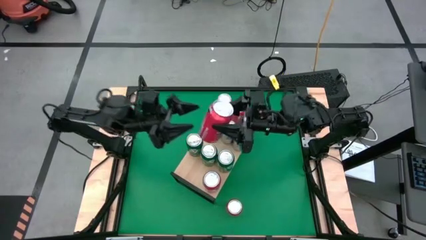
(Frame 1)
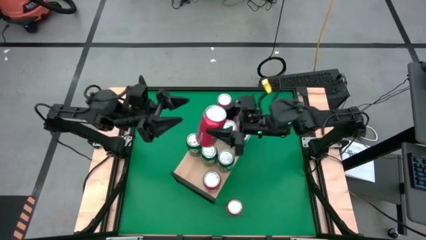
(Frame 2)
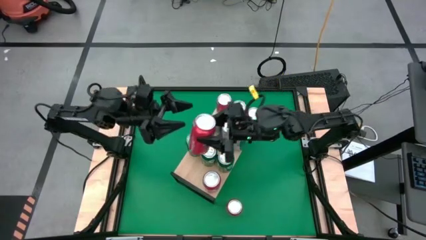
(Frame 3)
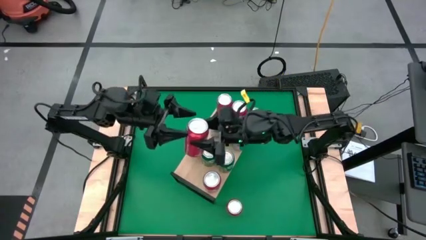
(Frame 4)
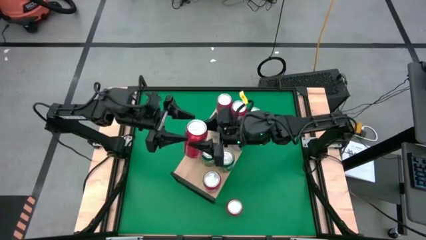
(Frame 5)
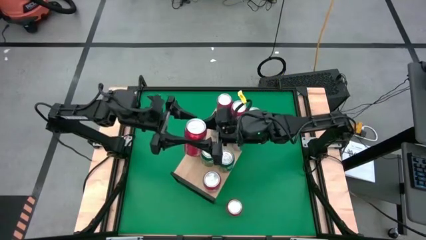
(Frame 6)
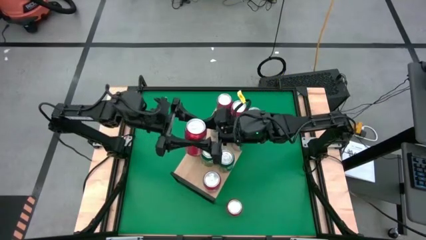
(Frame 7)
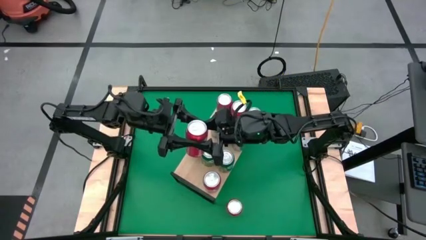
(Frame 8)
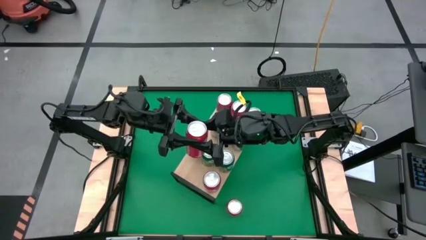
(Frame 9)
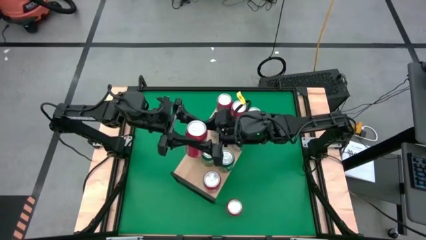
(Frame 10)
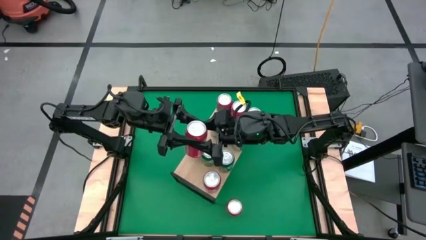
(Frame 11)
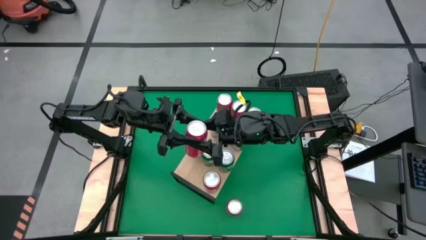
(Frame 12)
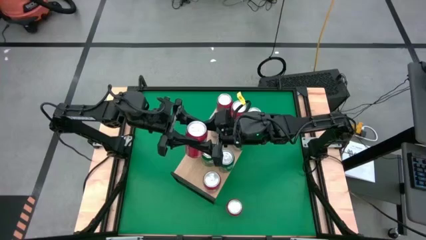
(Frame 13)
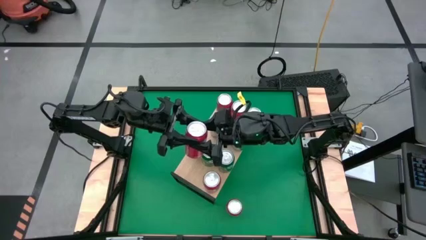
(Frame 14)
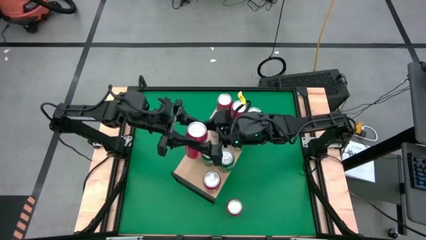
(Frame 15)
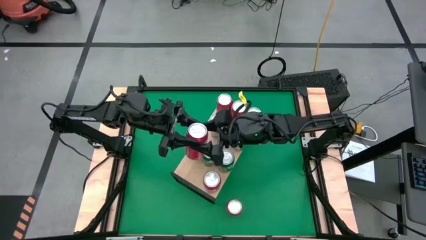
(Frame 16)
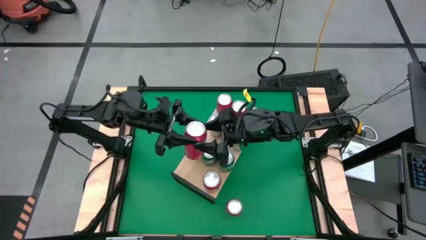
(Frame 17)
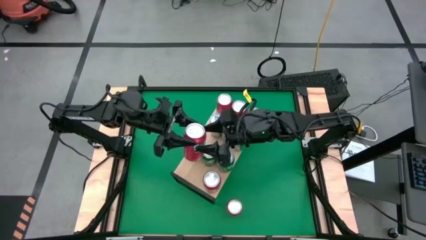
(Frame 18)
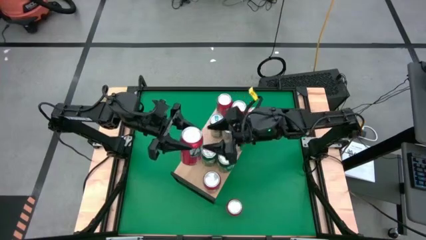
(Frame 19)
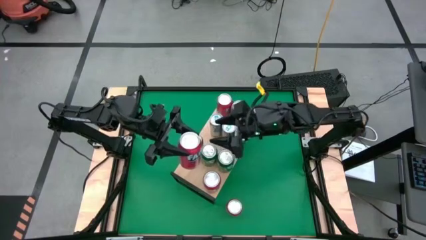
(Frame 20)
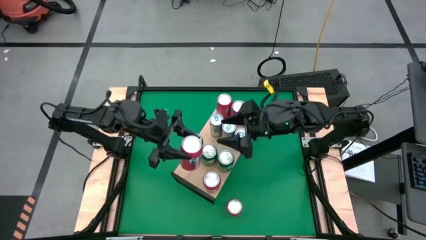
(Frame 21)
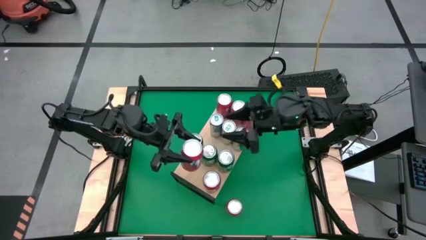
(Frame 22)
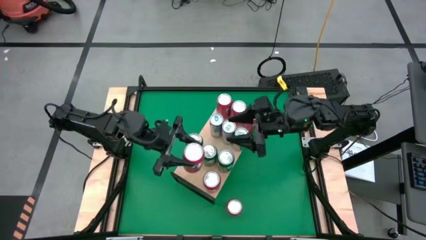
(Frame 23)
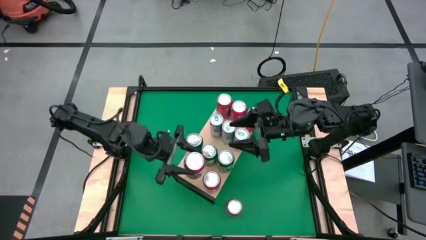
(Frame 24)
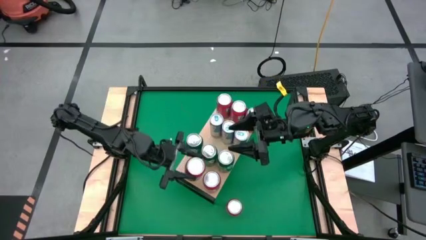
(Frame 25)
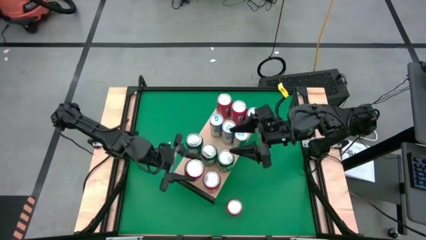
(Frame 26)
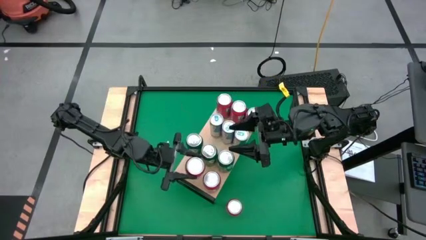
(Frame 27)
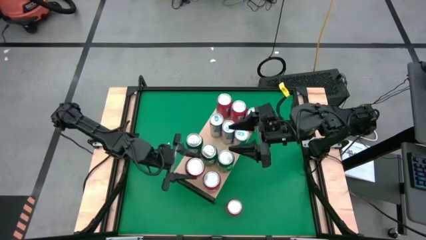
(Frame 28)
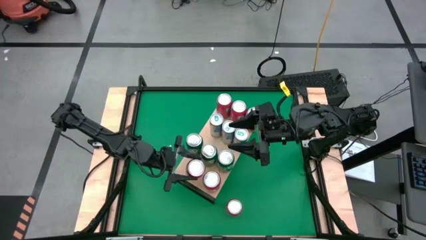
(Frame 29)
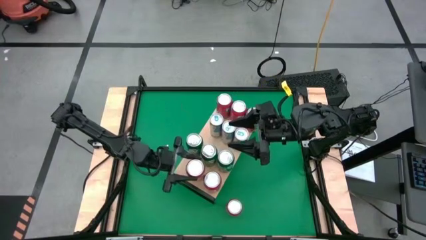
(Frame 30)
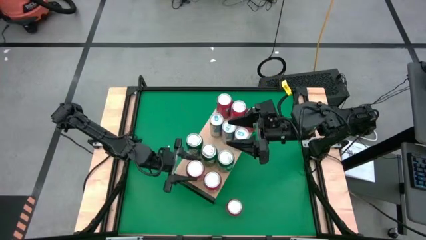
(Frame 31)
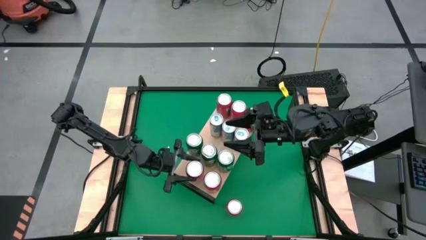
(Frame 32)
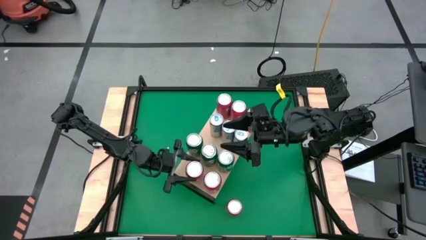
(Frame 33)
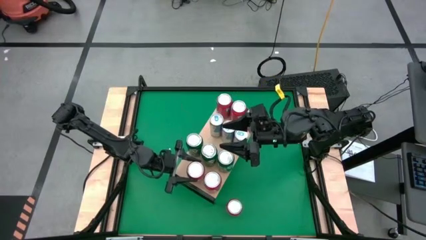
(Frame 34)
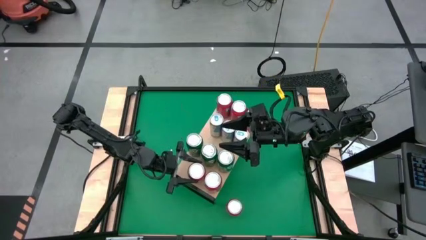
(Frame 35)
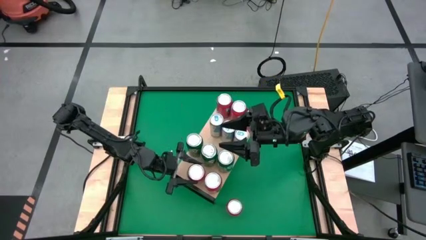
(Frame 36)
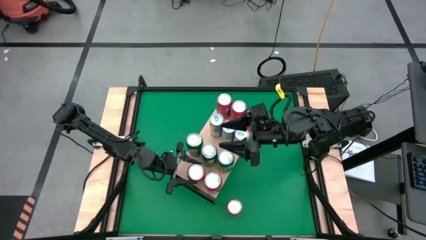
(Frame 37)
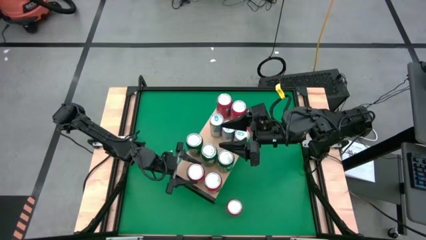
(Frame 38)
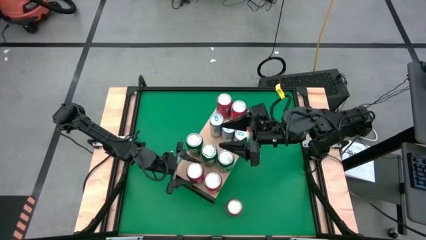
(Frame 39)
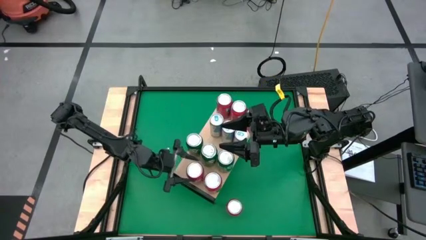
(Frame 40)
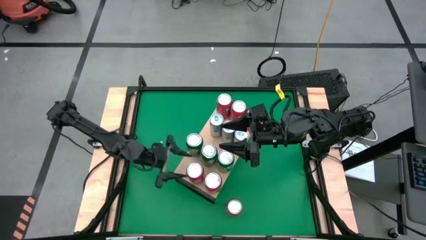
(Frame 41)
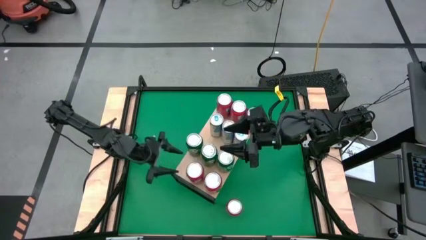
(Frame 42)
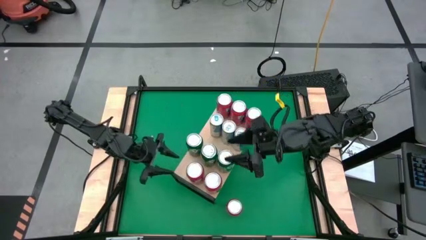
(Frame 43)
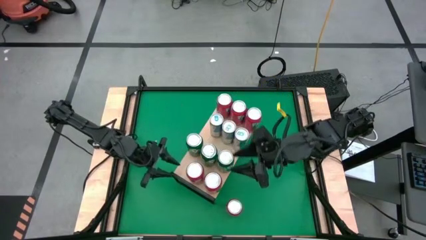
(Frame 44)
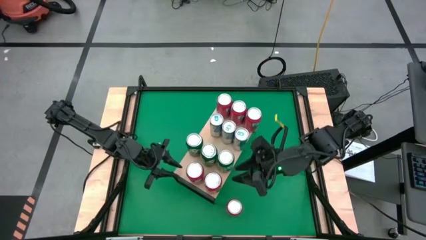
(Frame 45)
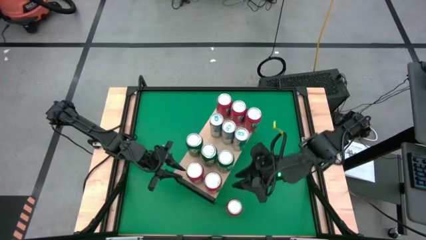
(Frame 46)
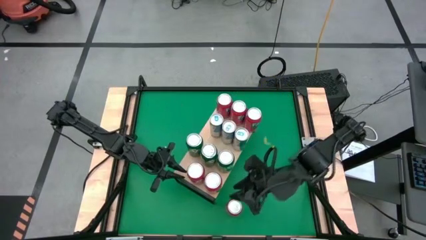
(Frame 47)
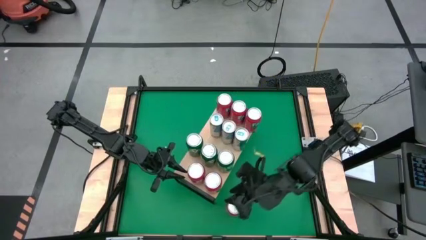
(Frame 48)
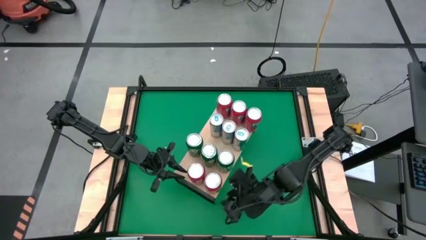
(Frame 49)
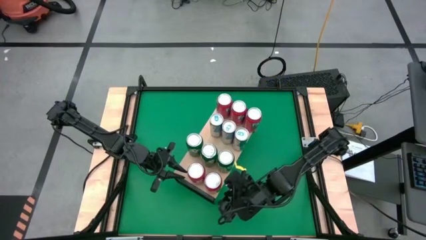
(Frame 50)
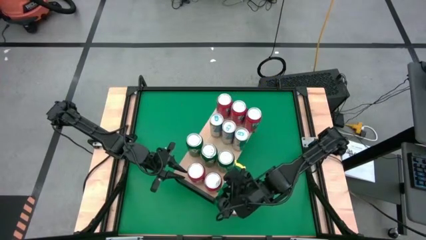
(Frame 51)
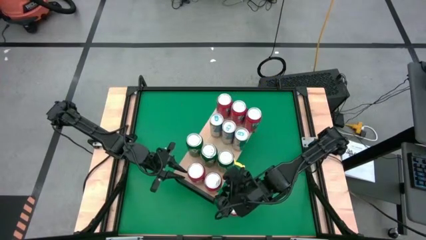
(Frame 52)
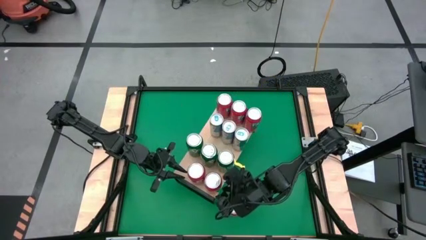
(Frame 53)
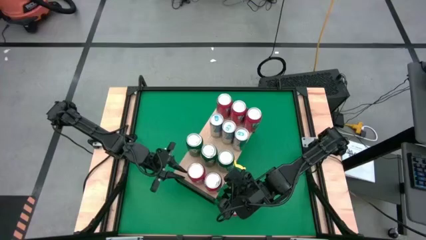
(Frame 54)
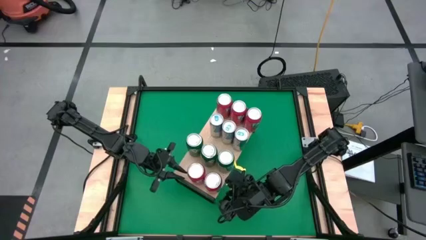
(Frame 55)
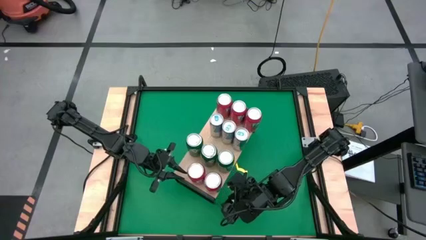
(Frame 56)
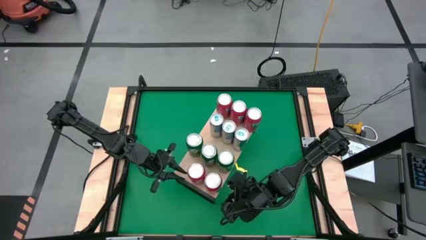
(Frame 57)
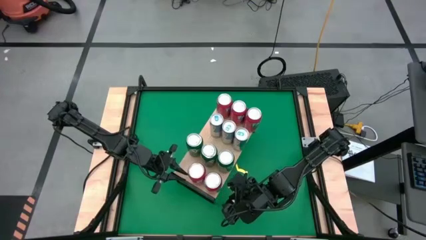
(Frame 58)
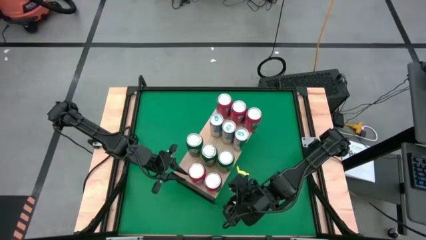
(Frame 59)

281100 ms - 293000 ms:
Task: Sort soda cans
Put the red soda can on the shelf and align it with the bottom red soda can

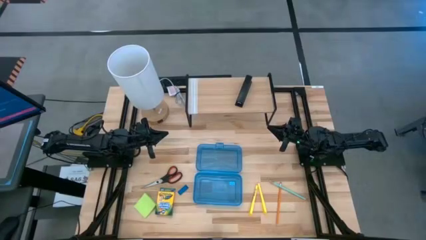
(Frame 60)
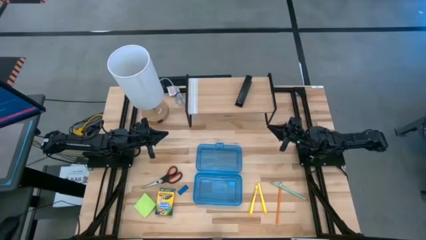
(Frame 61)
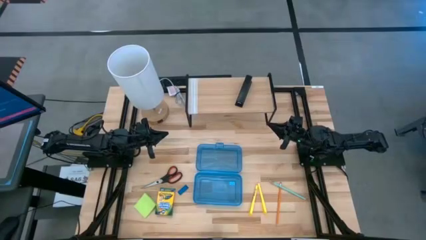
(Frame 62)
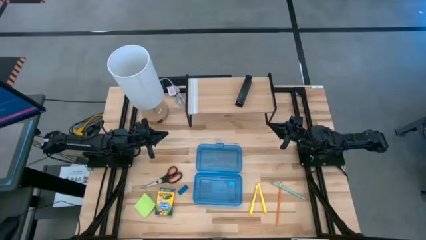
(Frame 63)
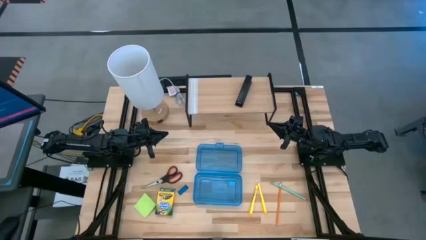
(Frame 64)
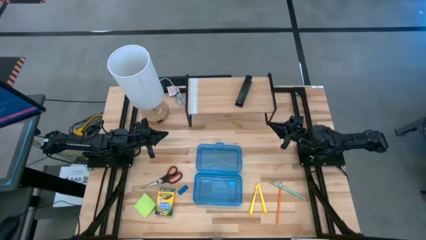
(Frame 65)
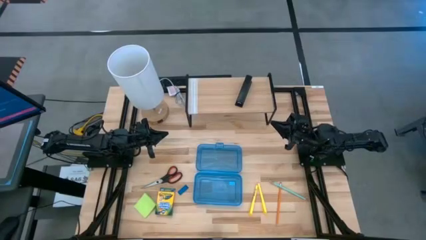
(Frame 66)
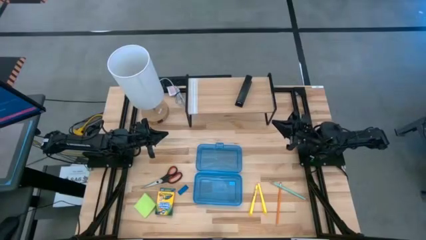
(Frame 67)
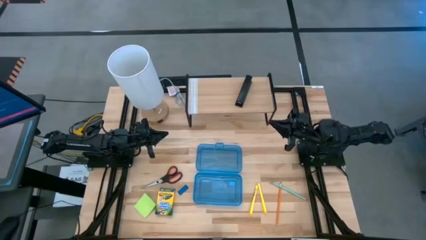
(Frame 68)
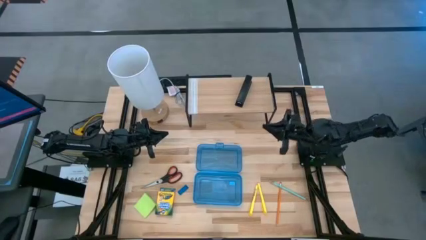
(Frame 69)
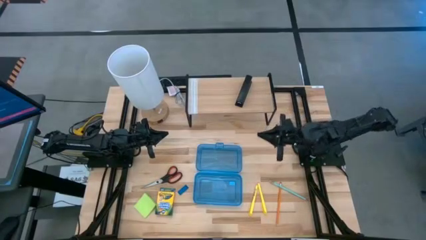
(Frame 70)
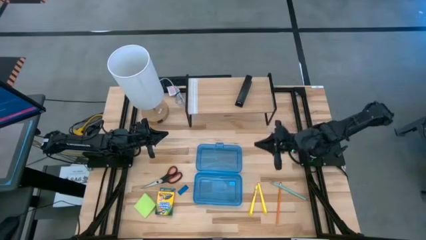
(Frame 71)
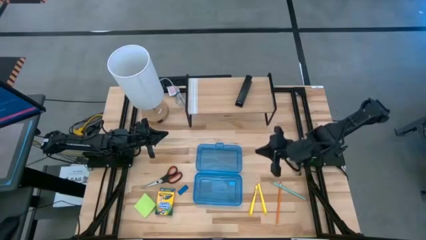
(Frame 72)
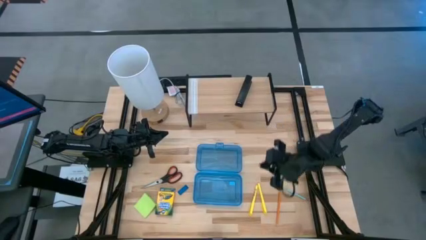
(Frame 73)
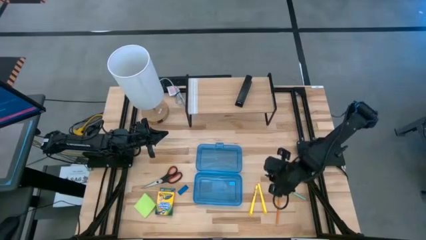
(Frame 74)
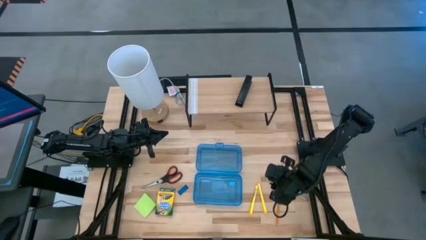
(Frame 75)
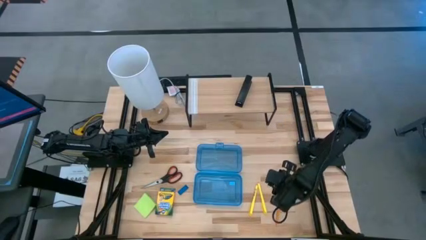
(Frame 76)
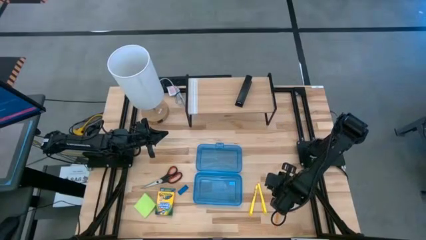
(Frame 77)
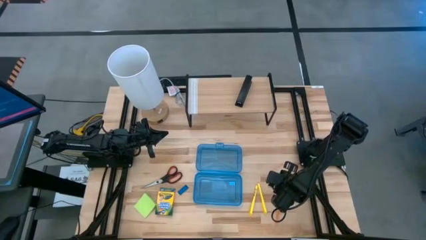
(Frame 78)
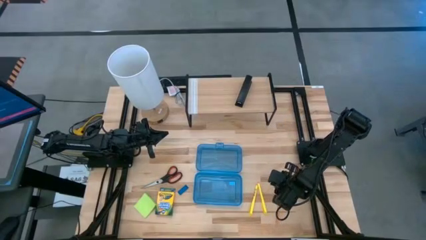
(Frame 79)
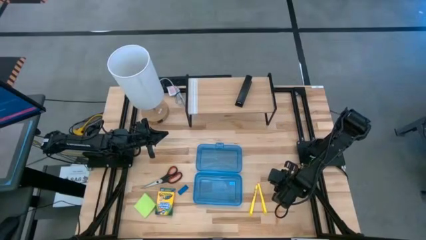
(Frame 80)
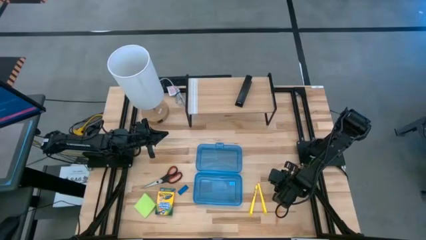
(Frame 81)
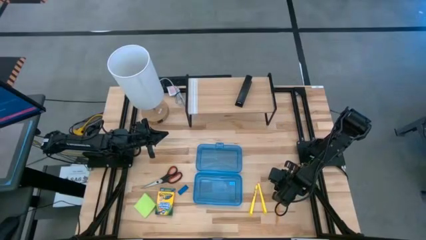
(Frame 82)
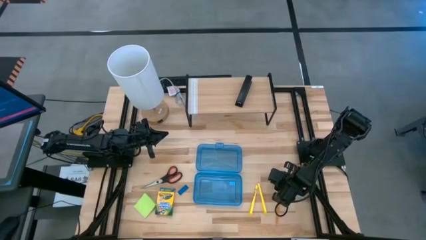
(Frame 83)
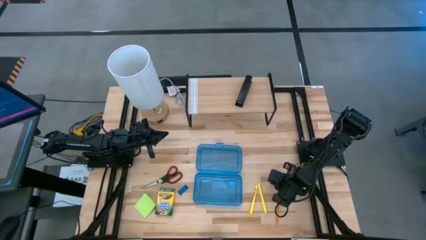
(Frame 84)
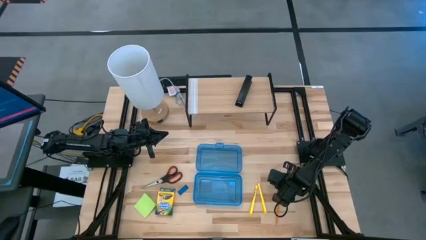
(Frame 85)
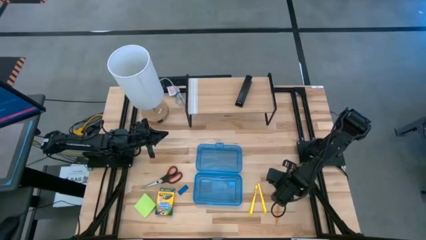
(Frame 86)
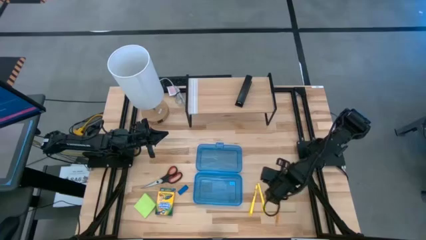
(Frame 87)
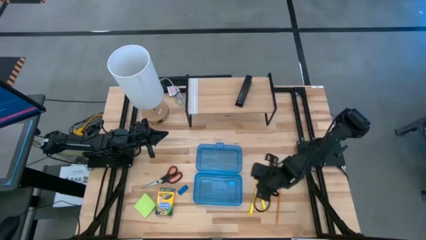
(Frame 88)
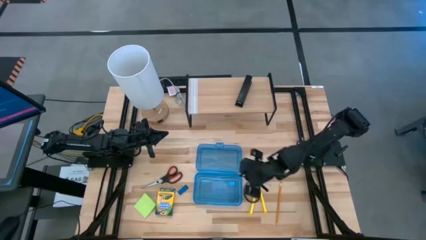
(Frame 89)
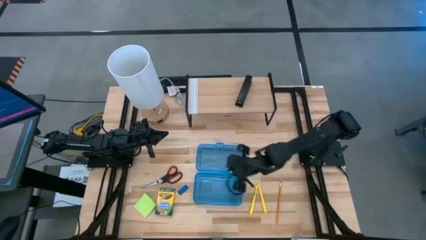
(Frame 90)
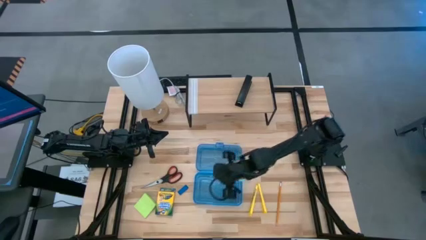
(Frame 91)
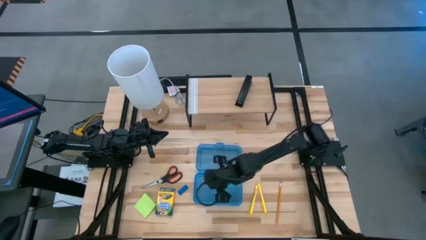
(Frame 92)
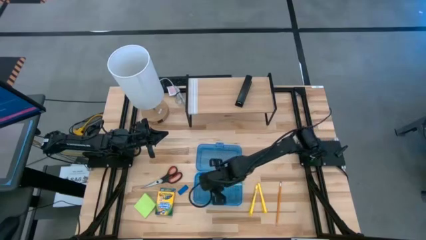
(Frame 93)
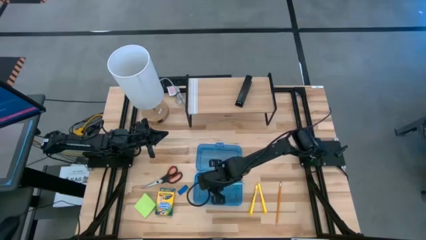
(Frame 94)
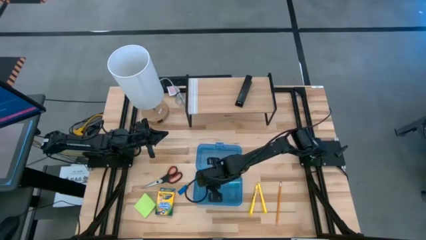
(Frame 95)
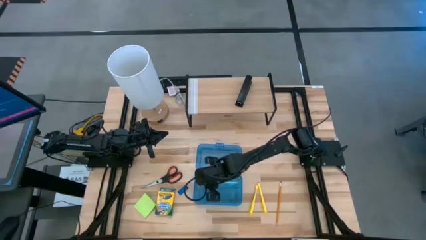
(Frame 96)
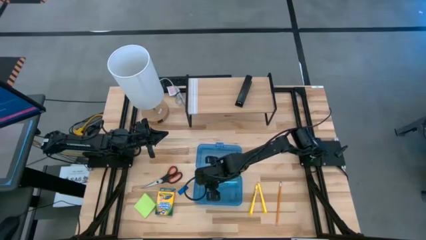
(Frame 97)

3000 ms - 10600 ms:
Task: Pack school essentials
Put the blue pencil into the blue supply box
